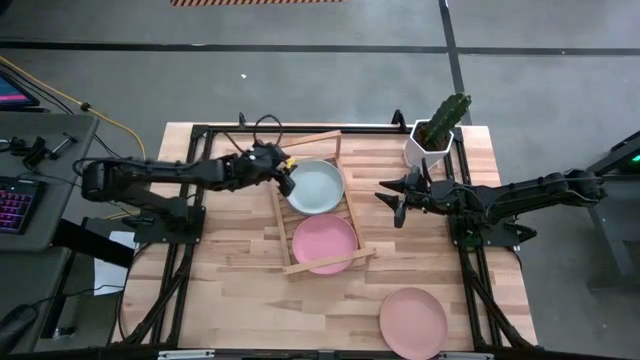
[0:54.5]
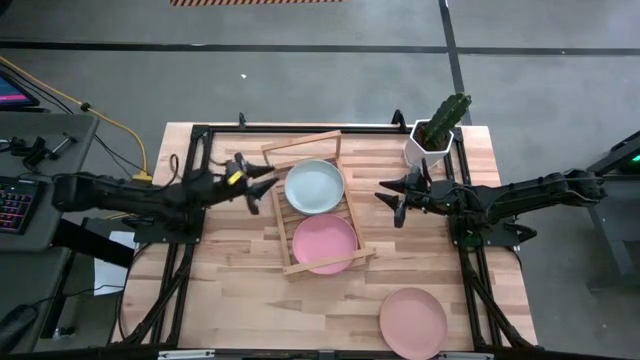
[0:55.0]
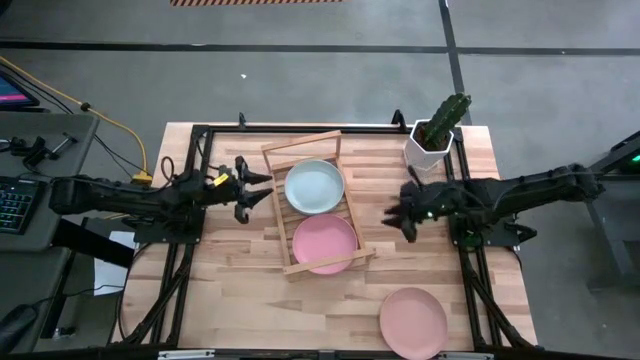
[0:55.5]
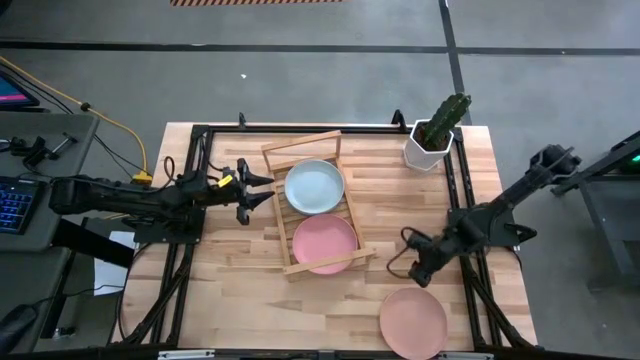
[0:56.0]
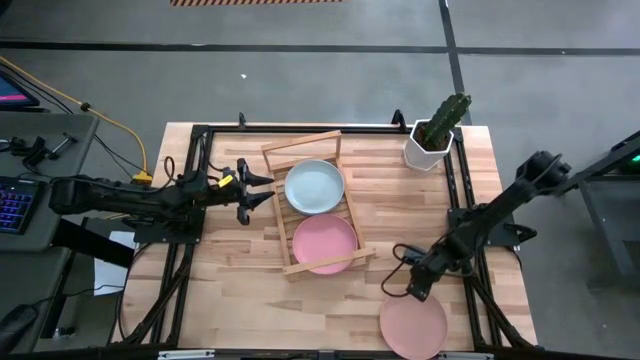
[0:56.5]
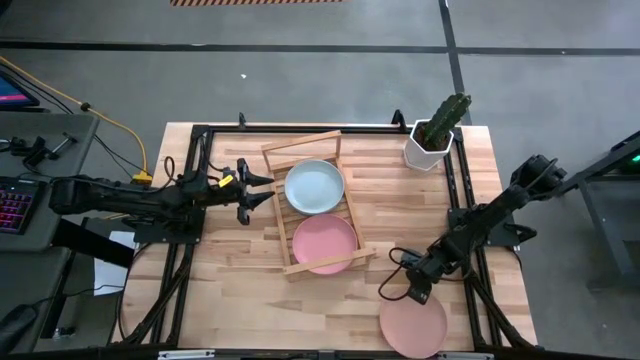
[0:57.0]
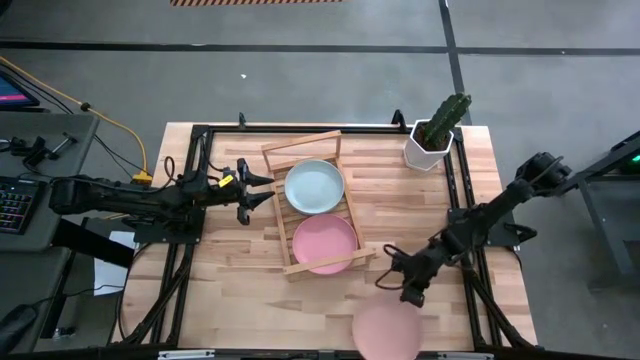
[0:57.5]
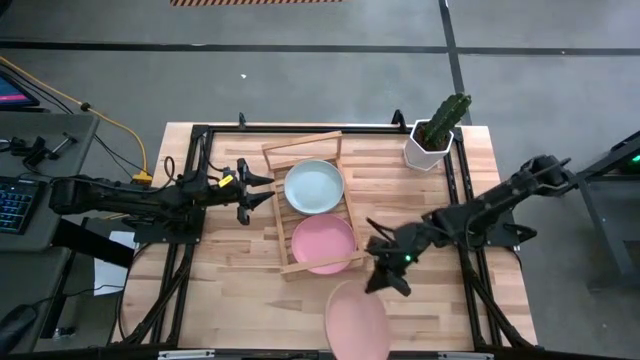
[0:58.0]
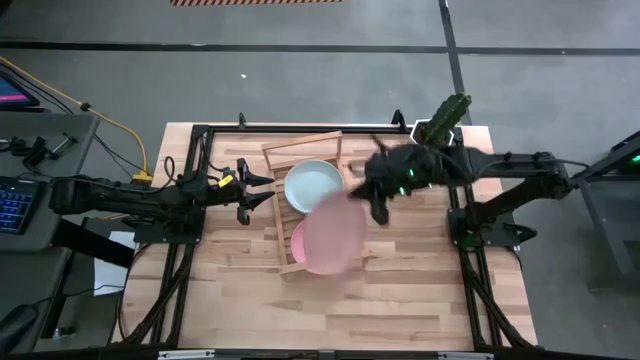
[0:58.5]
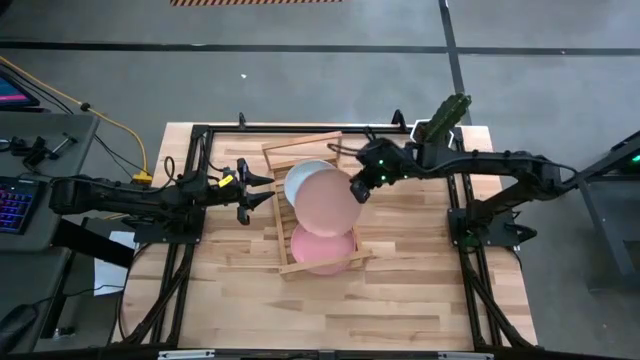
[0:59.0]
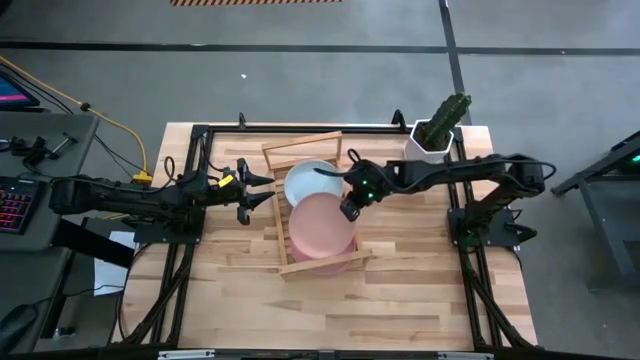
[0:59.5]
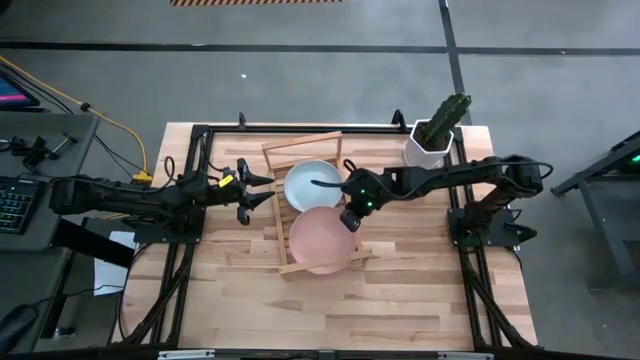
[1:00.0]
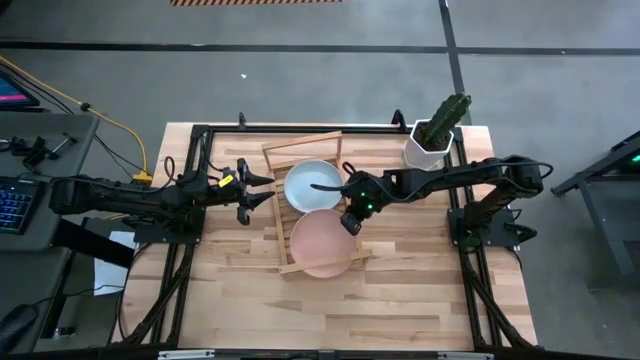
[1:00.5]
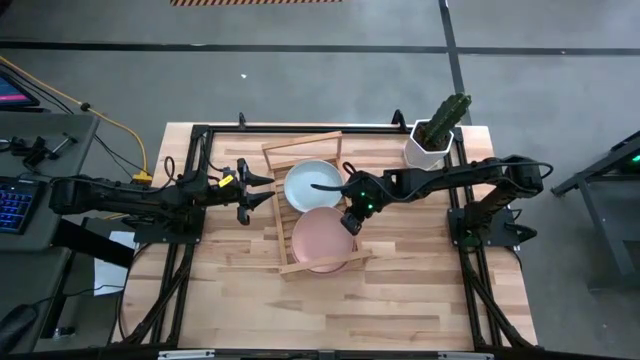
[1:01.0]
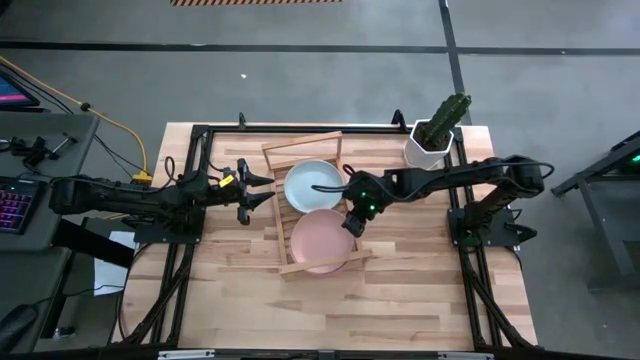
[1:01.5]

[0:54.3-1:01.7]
Task: Place and stack plates onto a shelf
Stack the pink plate on top of the pink plate on the shelf

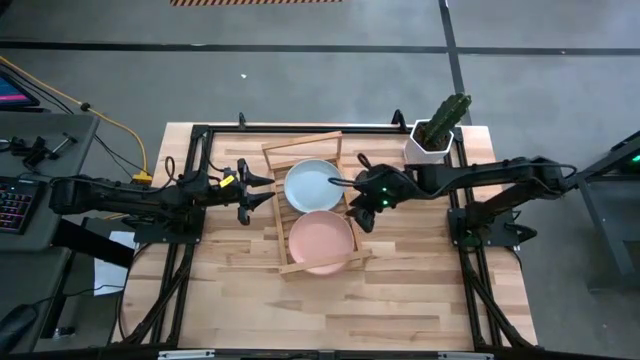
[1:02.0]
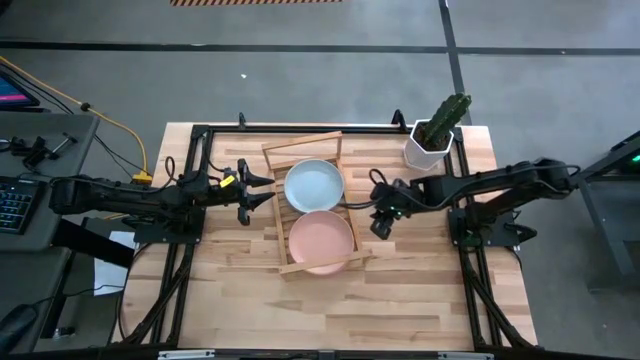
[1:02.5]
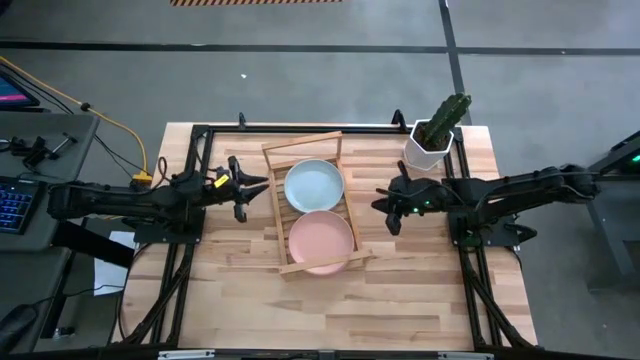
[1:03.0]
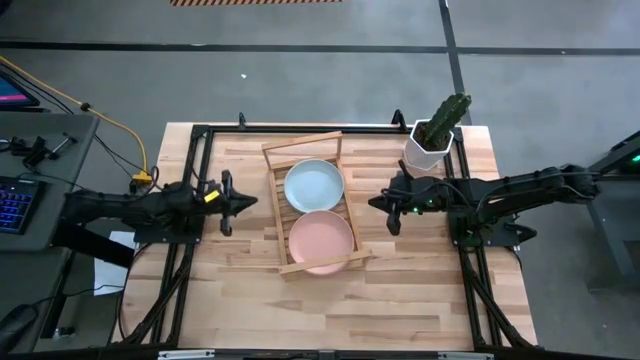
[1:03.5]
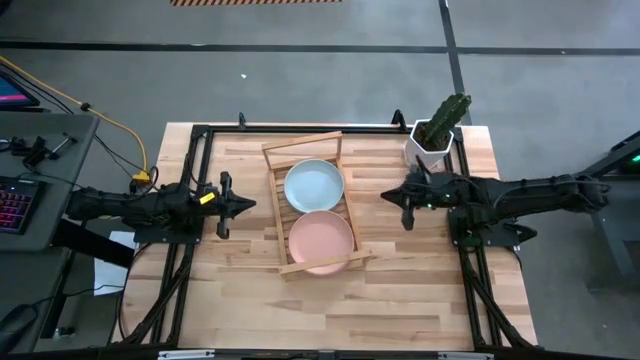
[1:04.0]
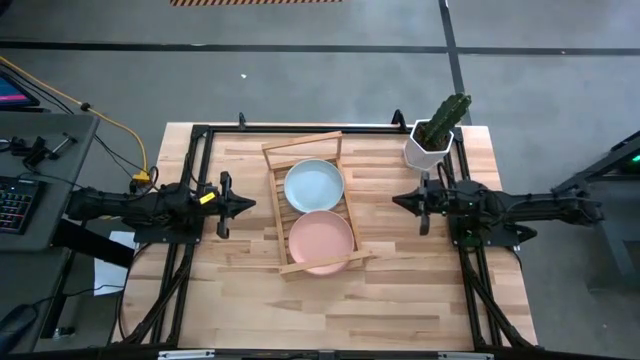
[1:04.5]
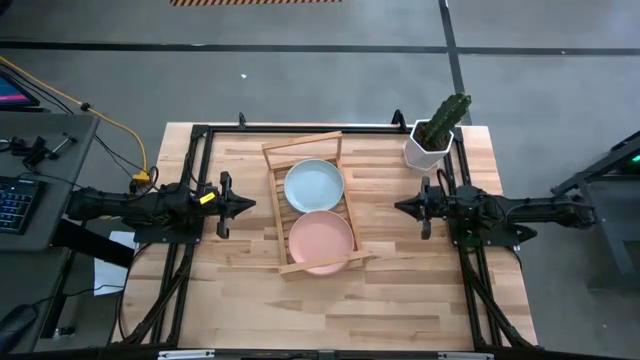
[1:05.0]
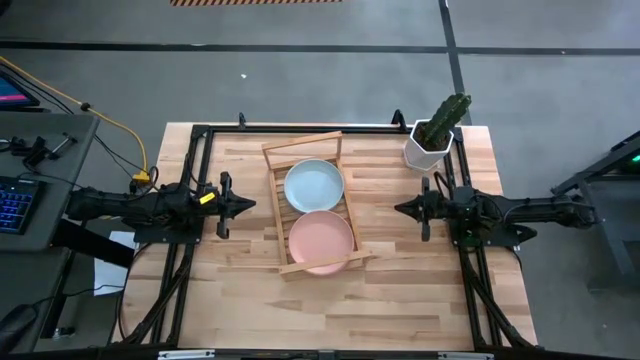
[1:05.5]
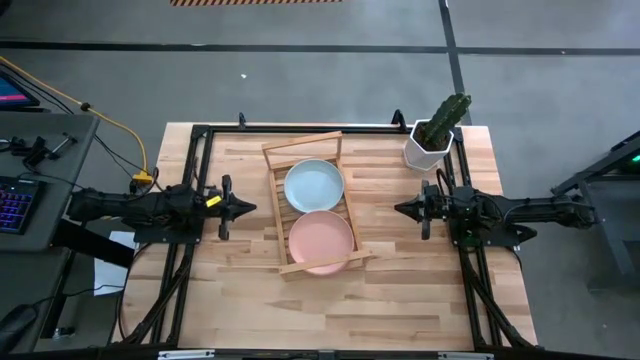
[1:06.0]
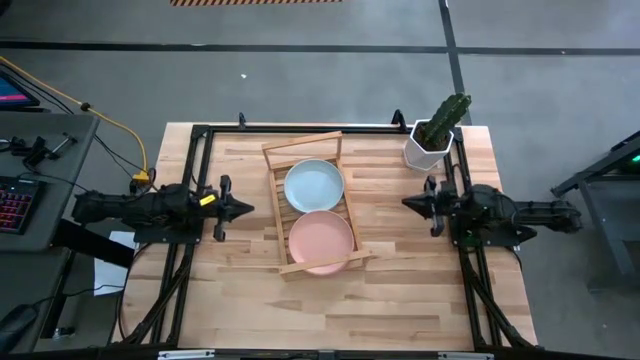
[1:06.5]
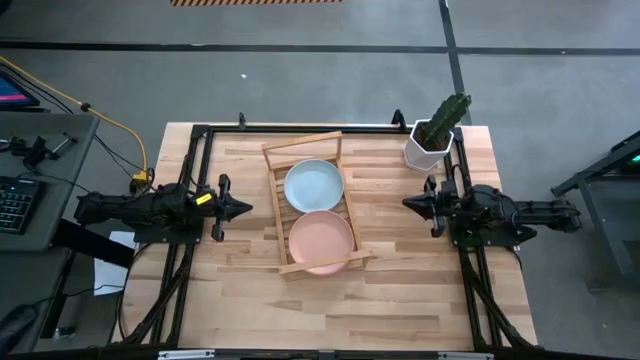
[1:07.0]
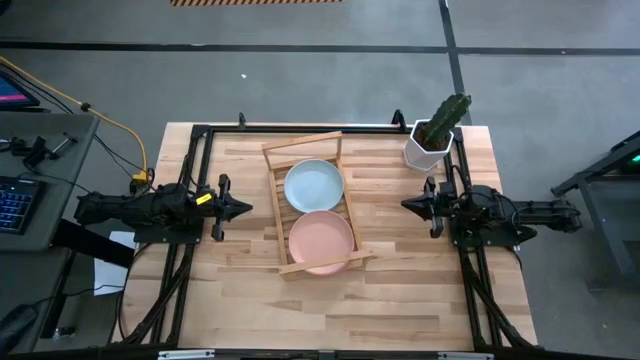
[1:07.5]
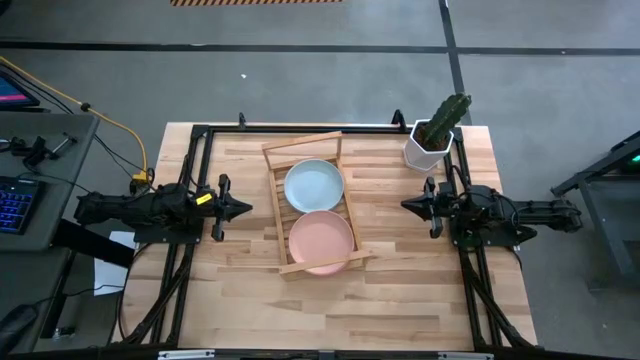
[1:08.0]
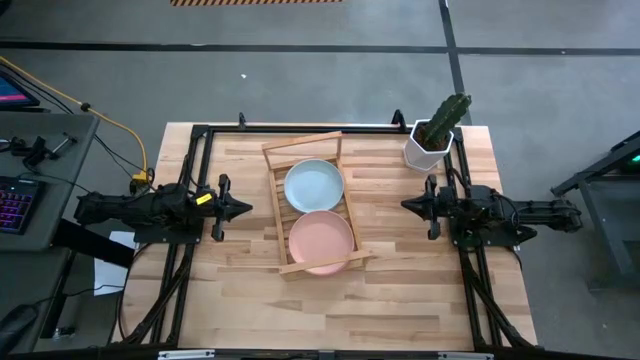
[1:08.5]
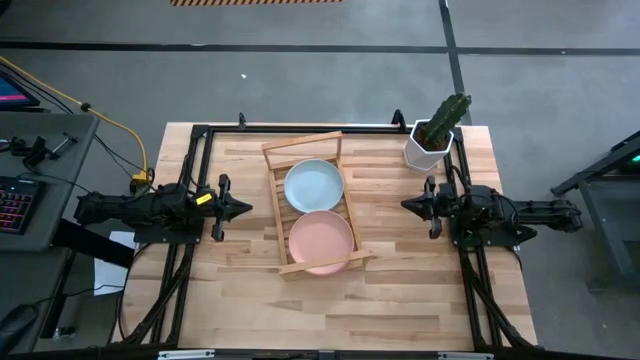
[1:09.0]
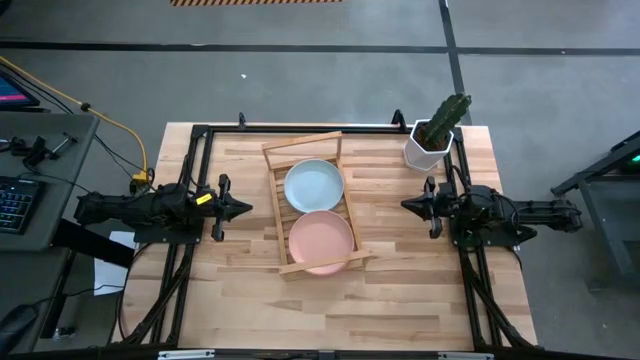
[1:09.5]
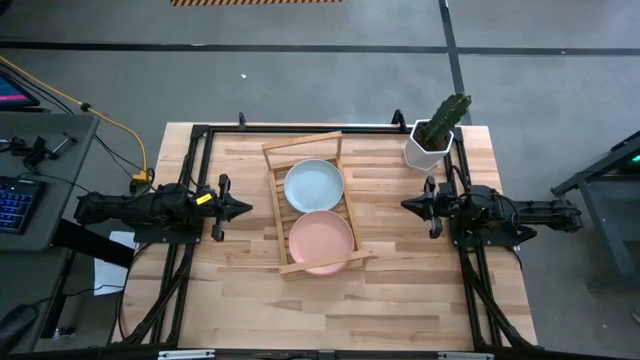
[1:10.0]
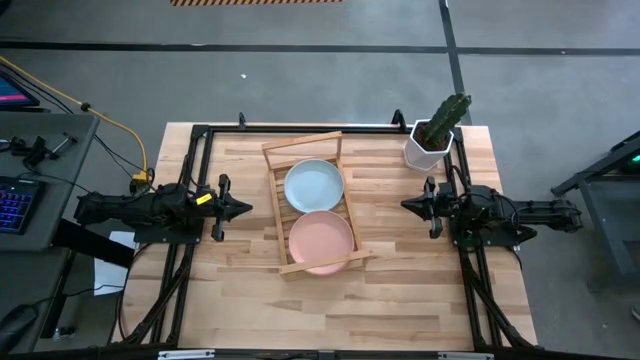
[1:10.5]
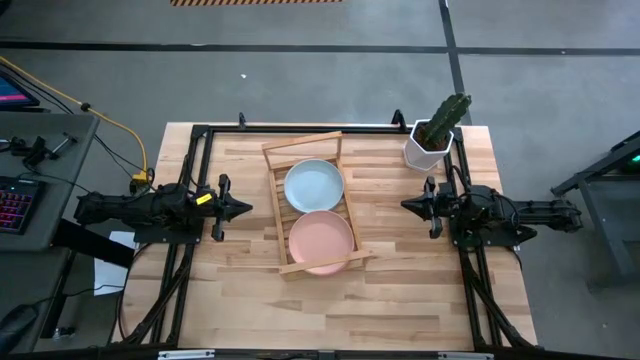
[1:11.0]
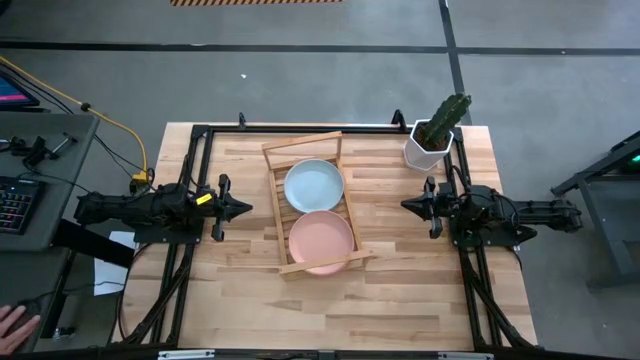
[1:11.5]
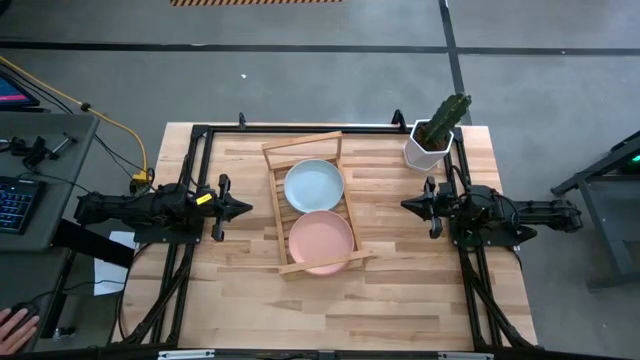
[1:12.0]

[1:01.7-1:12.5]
Return to Home Position

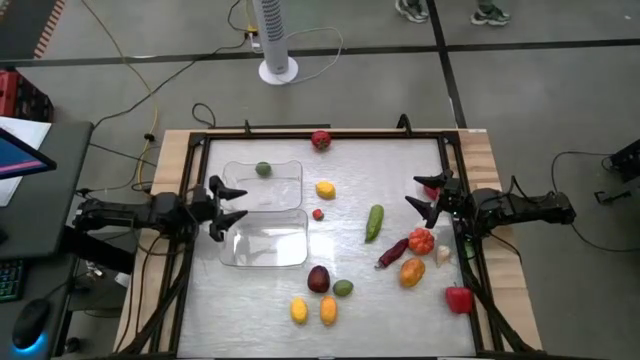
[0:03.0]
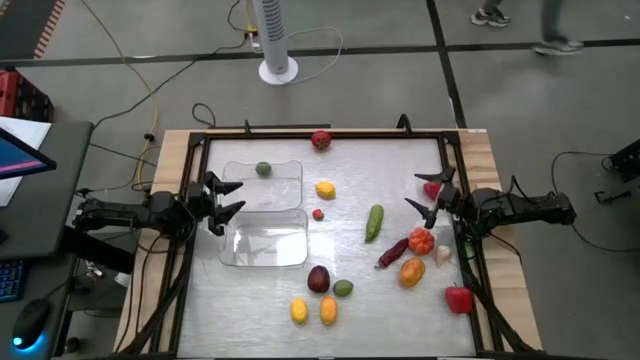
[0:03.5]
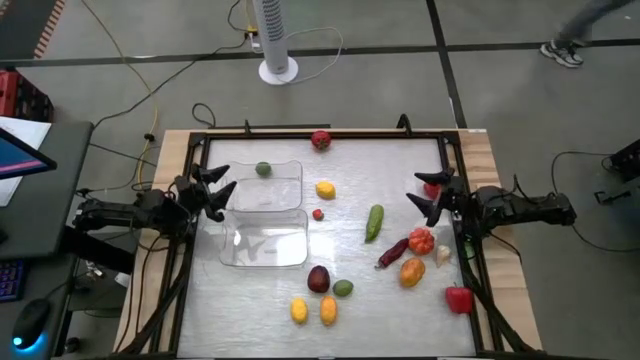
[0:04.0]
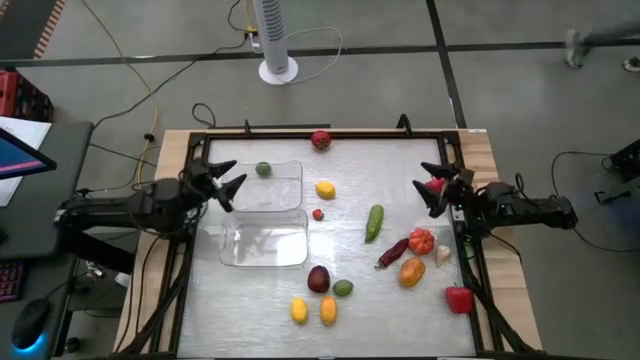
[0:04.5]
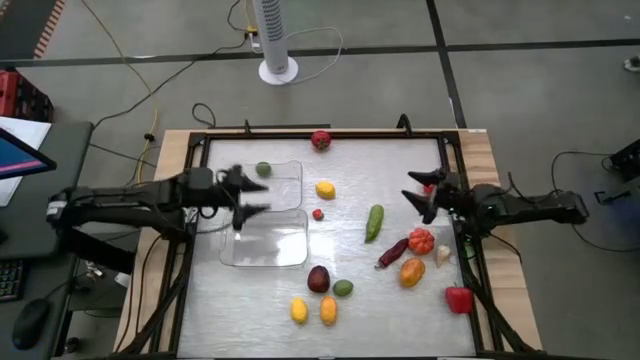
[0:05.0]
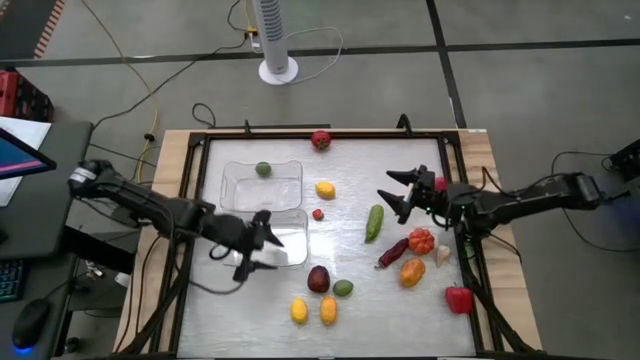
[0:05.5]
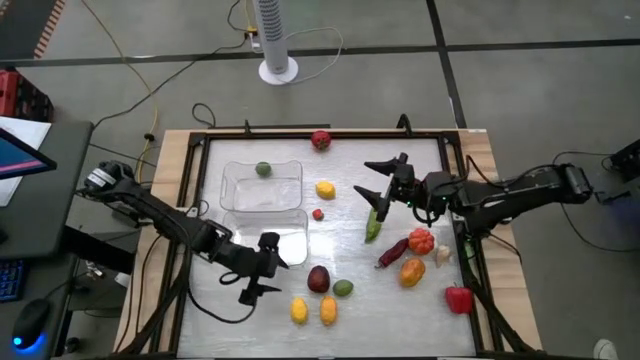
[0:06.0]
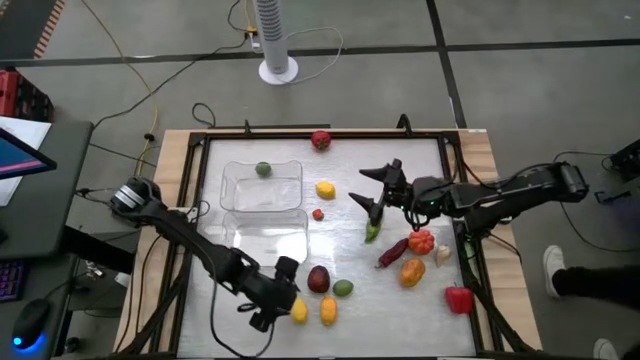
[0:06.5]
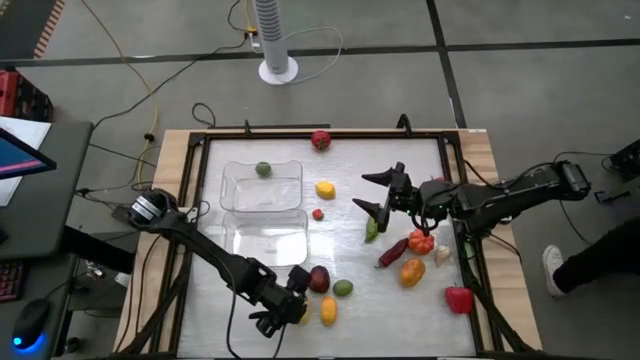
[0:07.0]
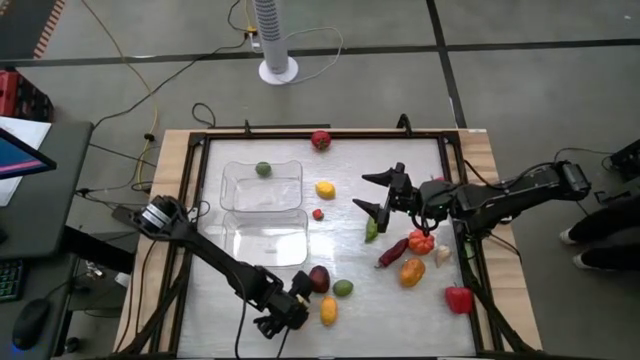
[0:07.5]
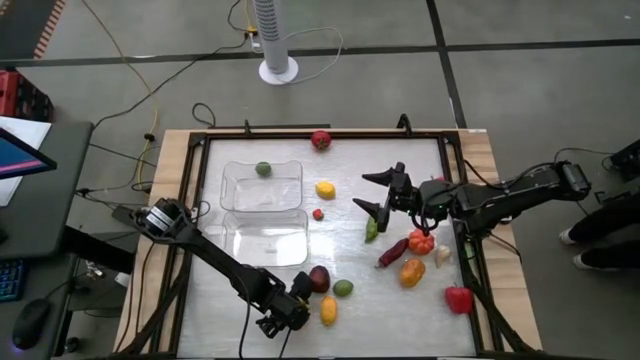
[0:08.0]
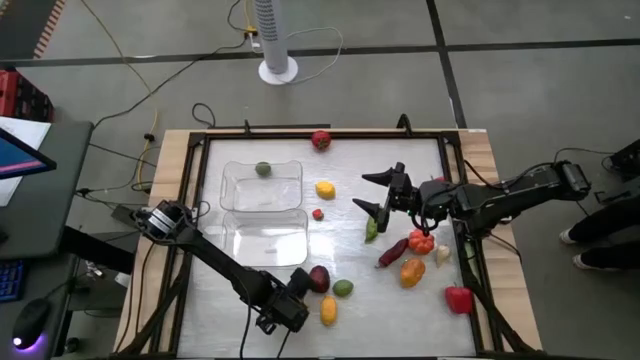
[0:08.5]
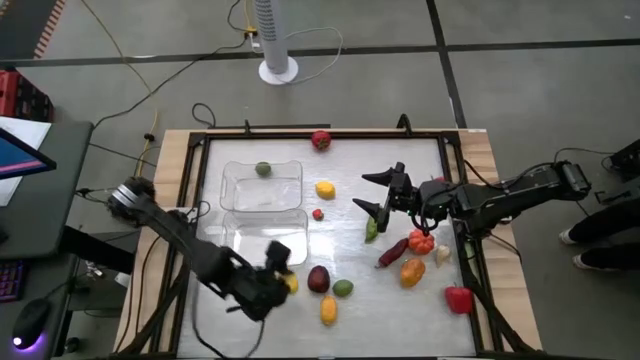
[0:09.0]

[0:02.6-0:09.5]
Task: Sort produce into baskets
Put the bottom left yellow lemon into the bottom transparent bin
